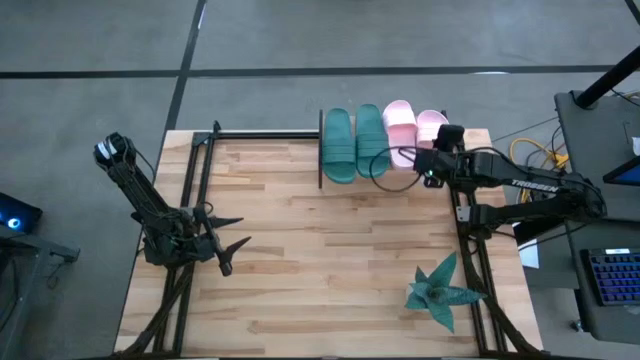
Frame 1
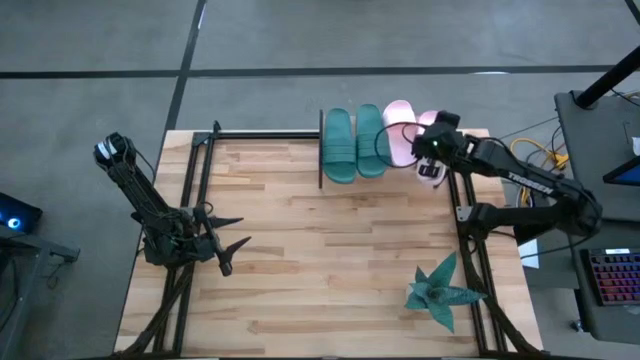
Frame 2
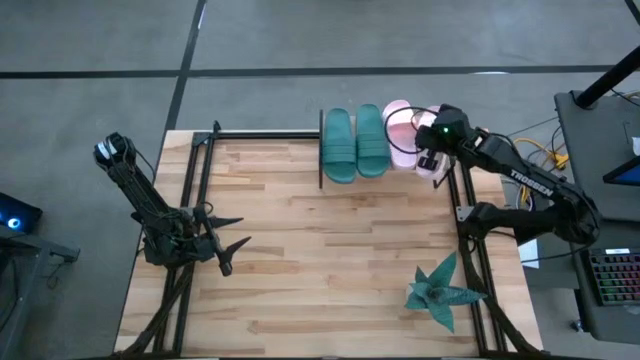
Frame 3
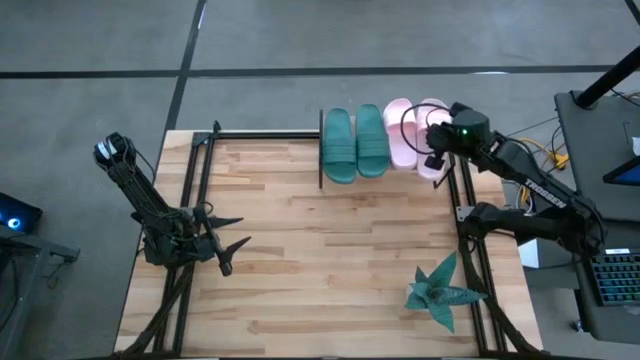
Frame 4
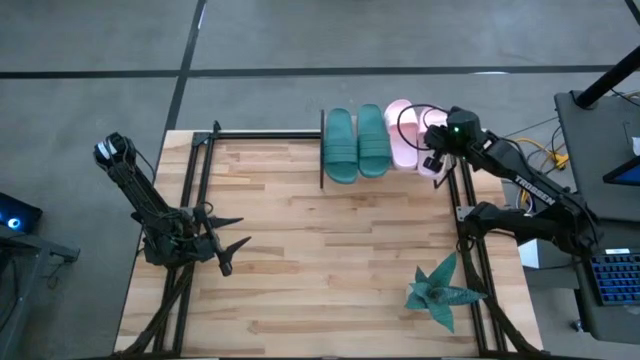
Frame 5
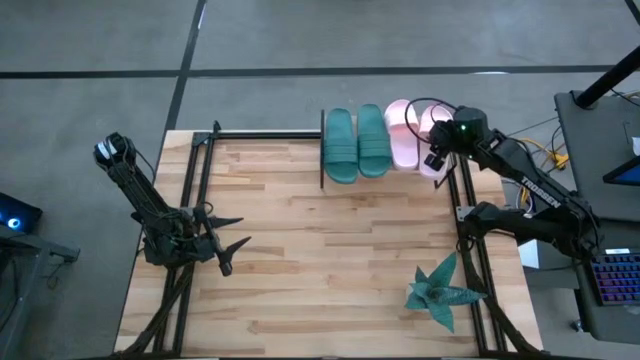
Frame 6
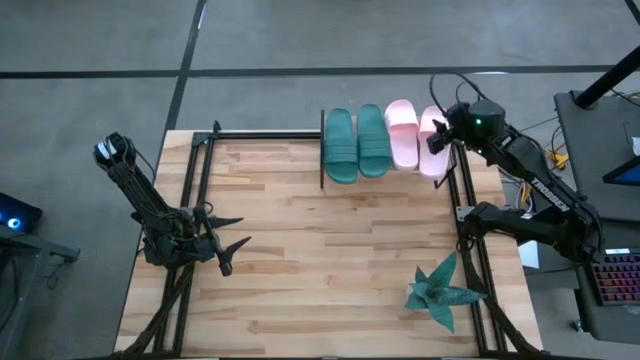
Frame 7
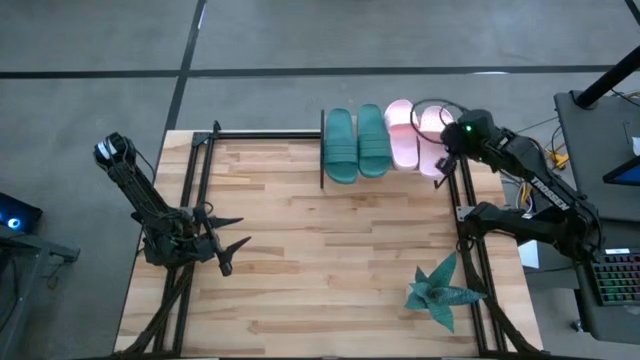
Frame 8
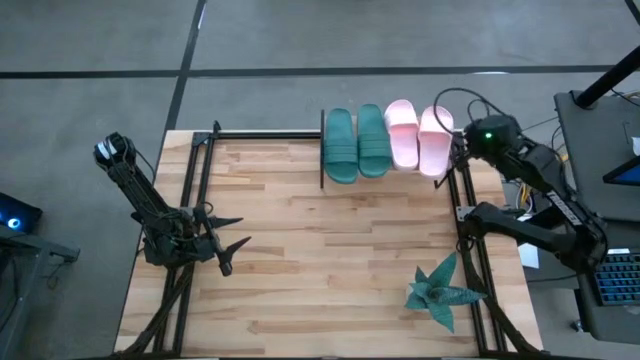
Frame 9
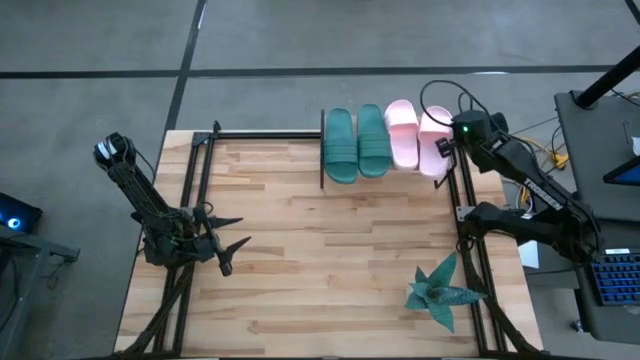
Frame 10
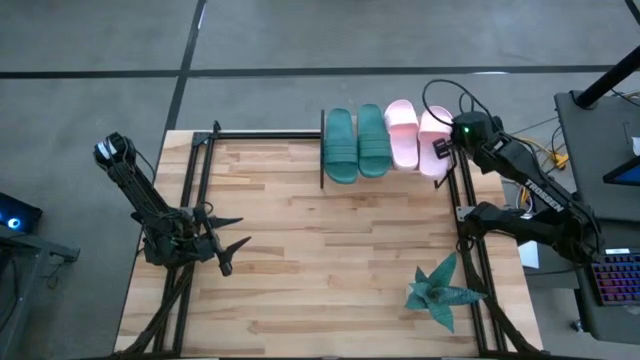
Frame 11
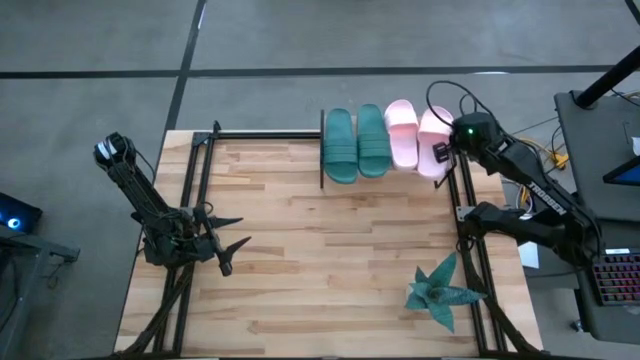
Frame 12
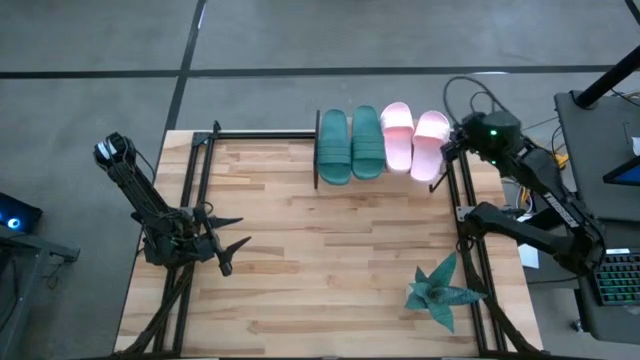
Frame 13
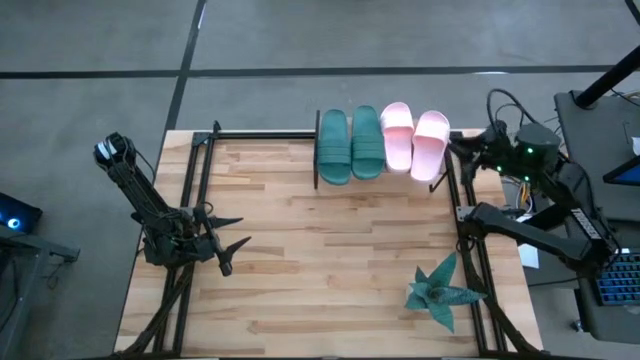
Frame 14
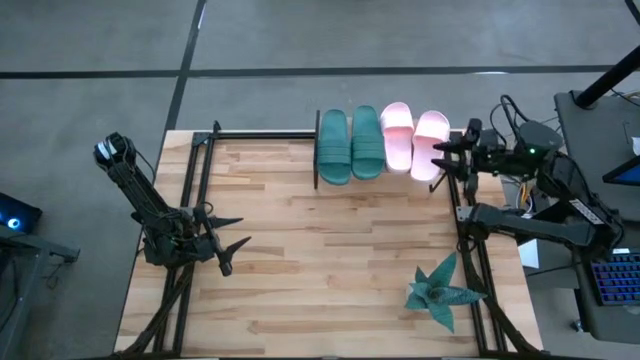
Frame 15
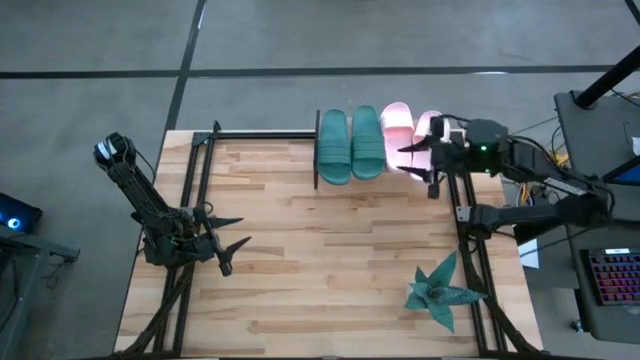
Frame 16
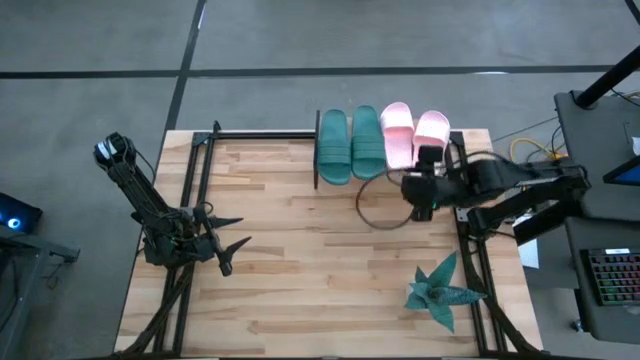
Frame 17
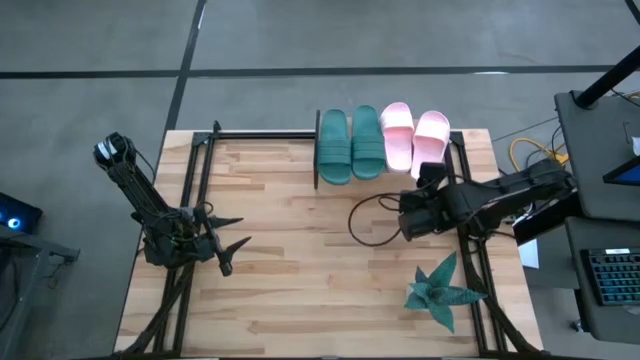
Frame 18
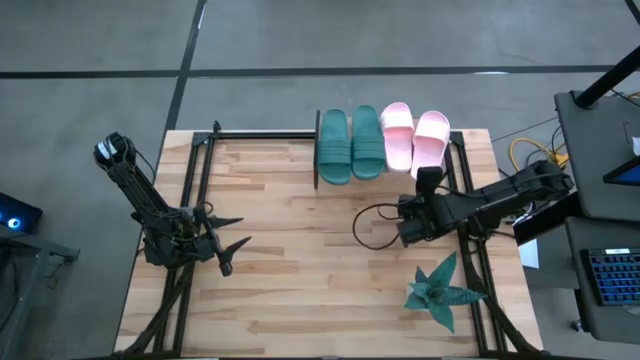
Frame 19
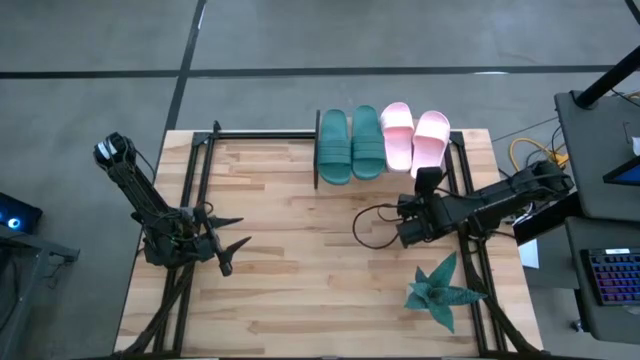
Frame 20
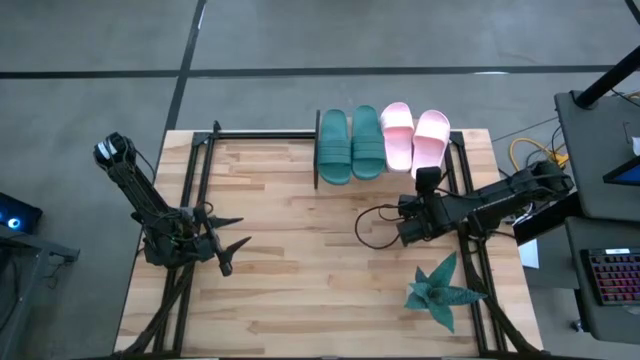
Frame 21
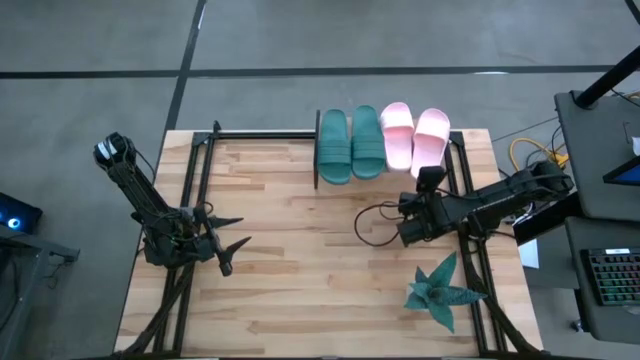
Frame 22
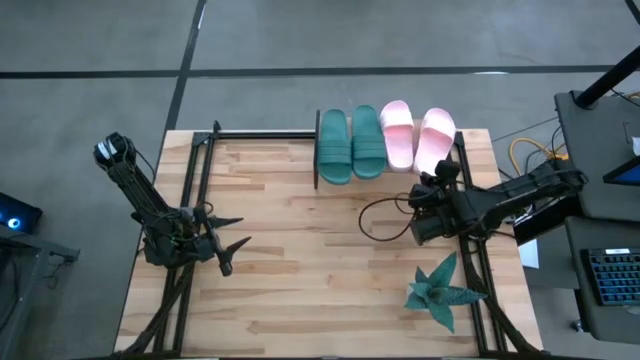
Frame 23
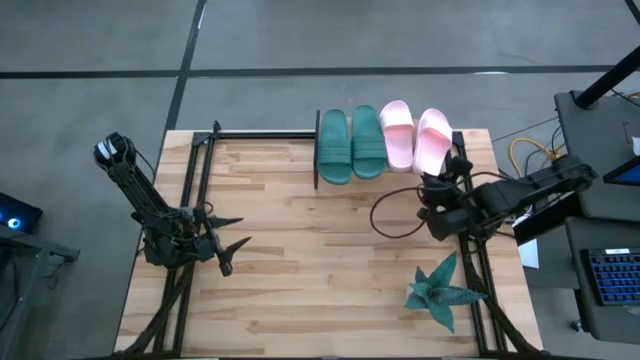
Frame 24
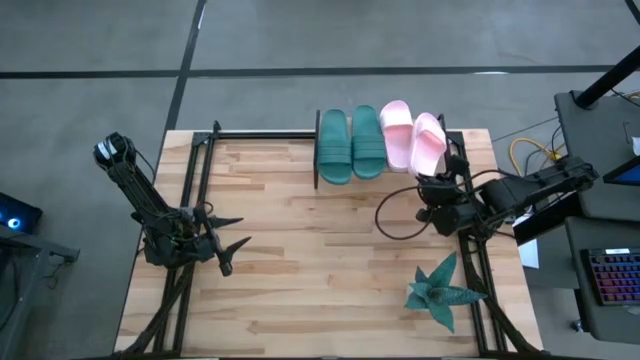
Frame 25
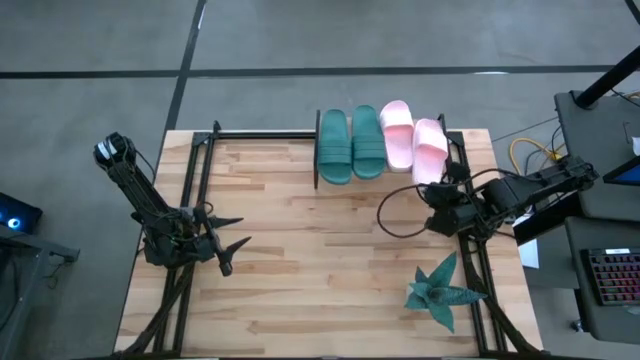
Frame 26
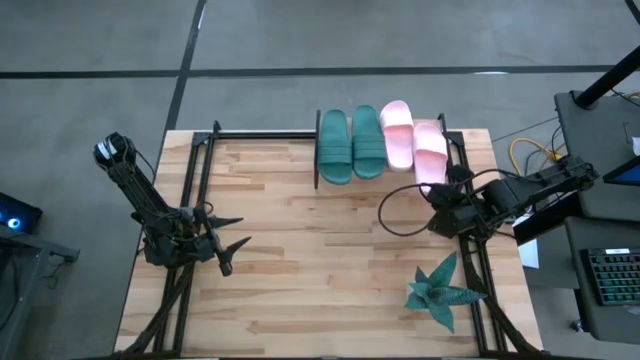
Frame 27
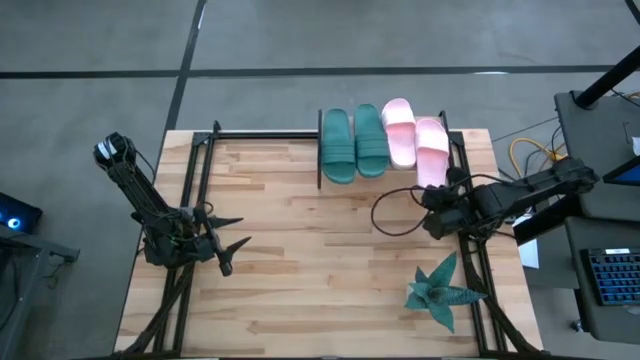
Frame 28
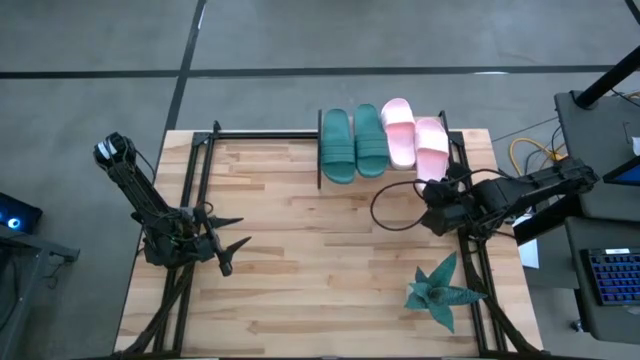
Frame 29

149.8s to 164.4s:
Task: Pick and place slides into the shelf
Adjust the right pink slipper

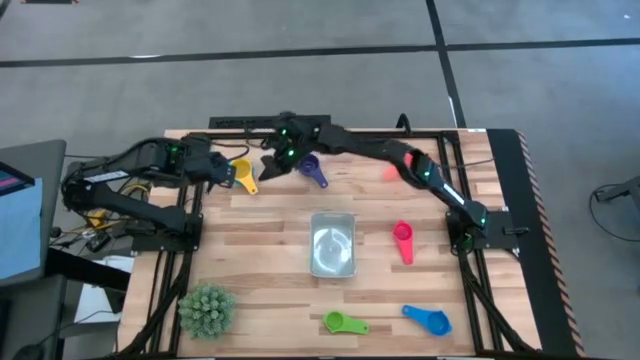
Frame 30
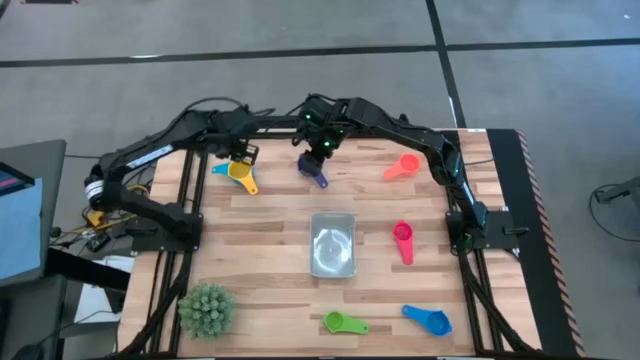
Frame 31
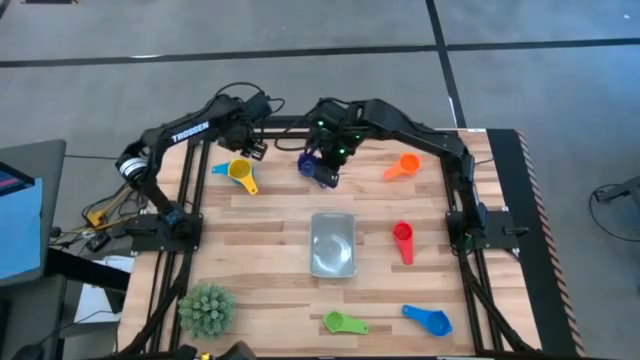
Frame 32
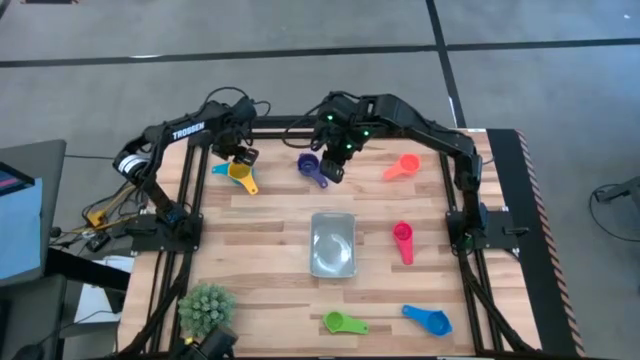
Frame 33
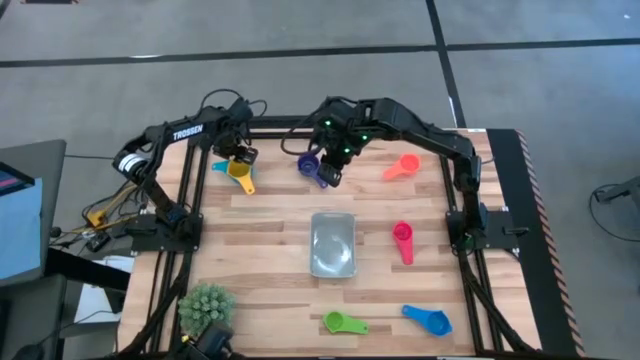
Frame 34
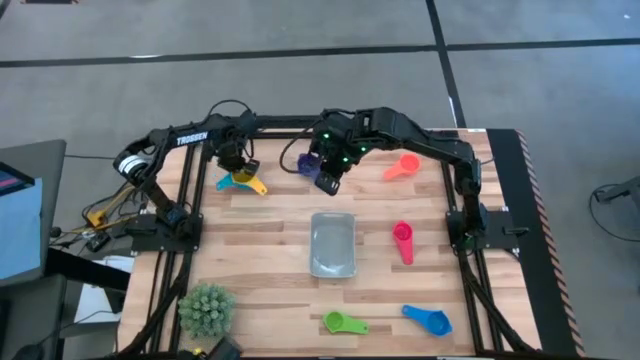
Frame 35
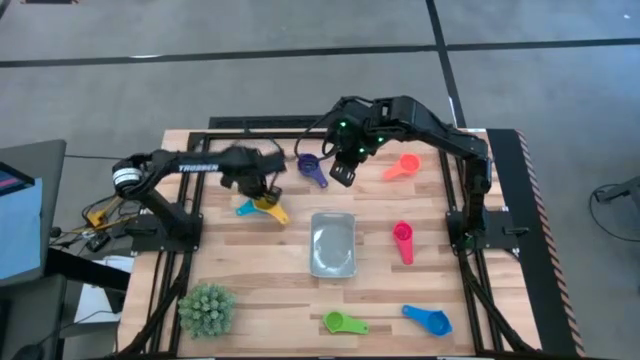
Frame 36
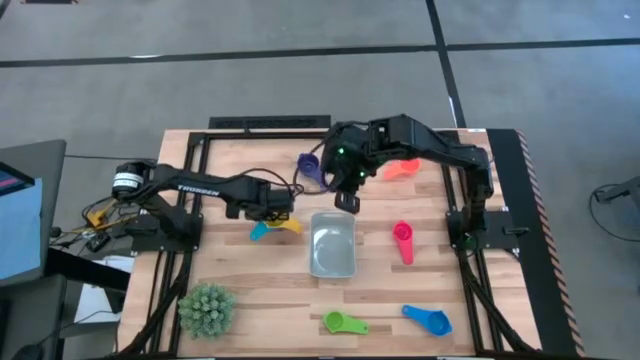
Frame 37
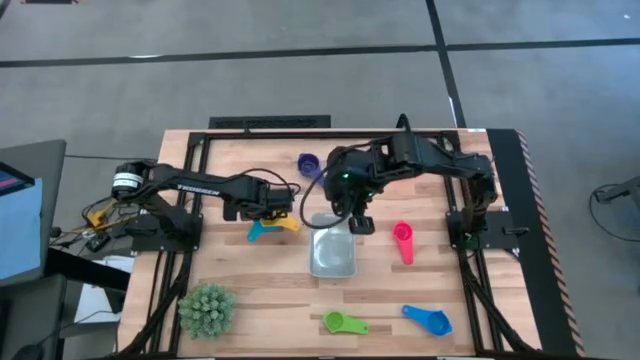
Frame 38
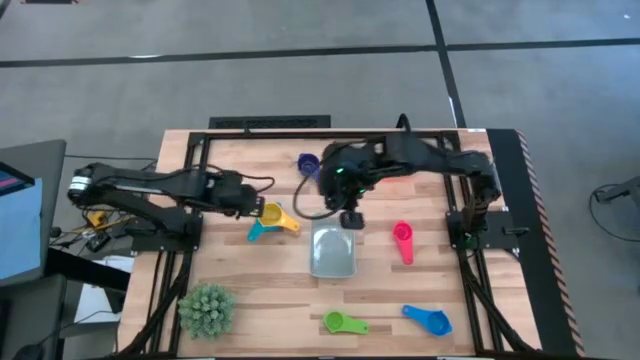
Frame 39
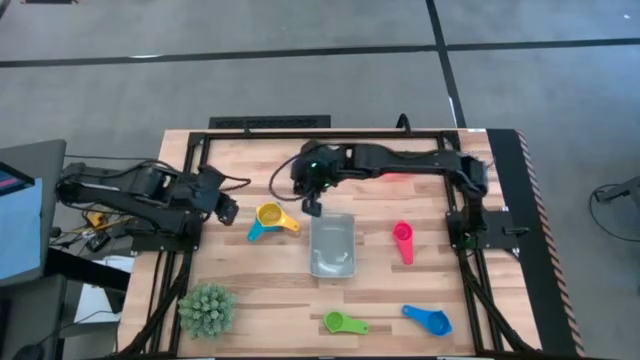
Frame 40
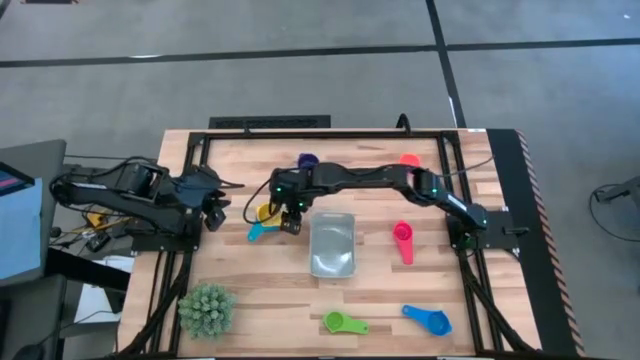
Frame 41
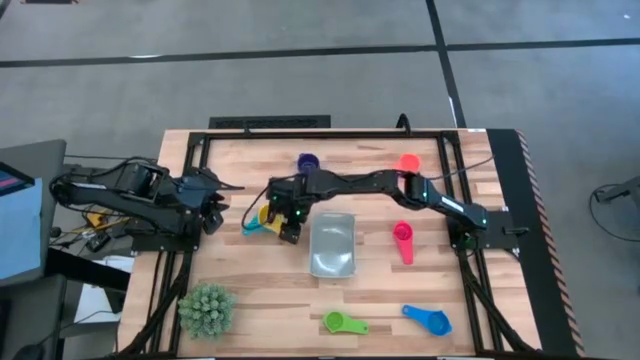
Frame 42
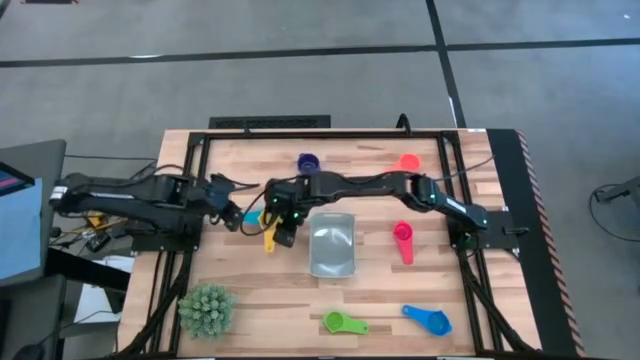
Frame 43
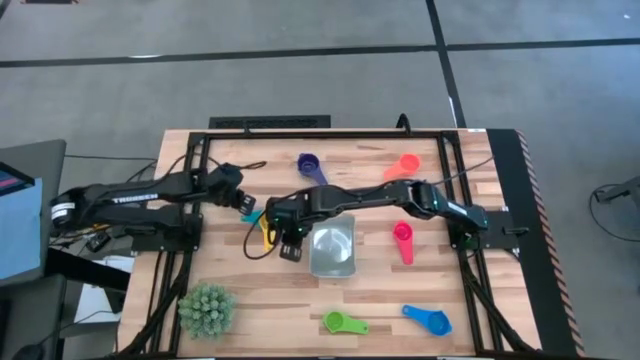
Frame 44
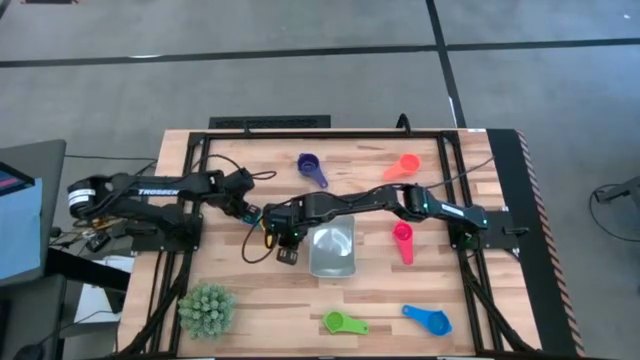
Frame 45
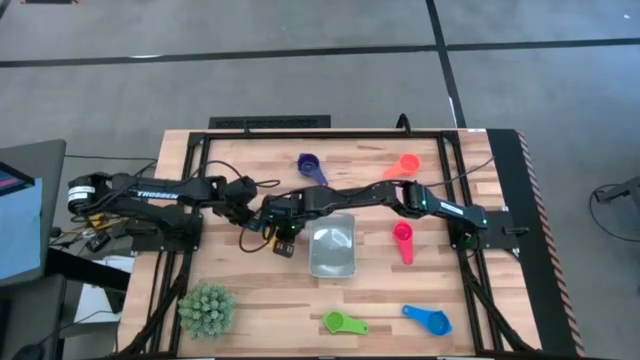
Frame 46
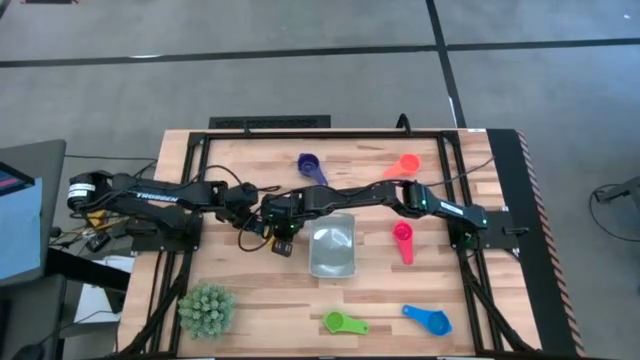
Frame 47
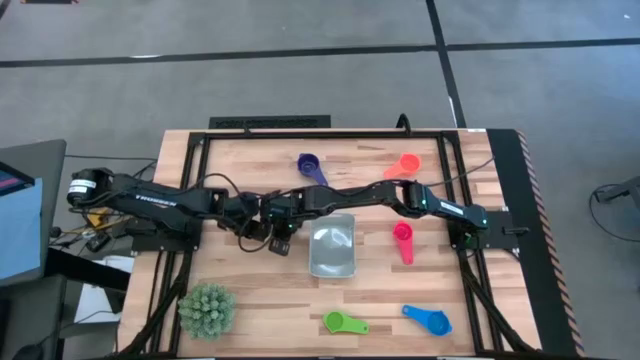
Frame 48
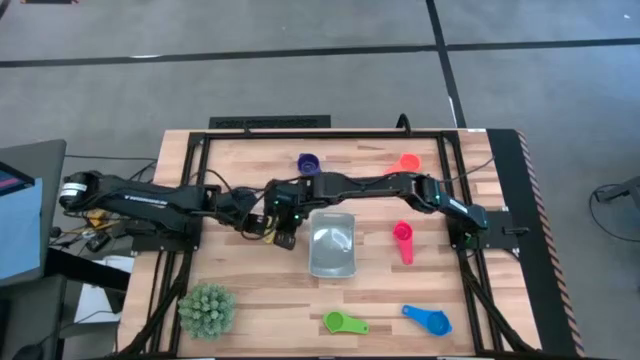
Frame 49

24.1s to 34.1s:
Task: Nest measuring cups in basket
Adjust the stacked measuring cups
